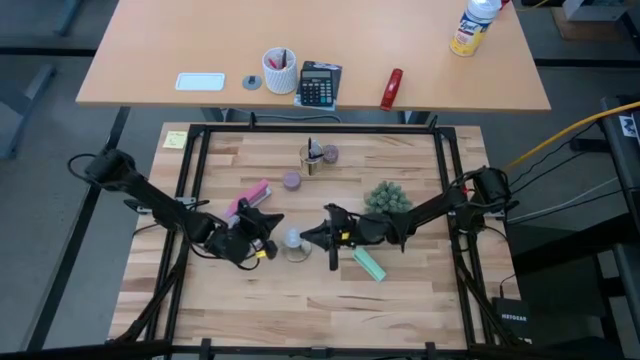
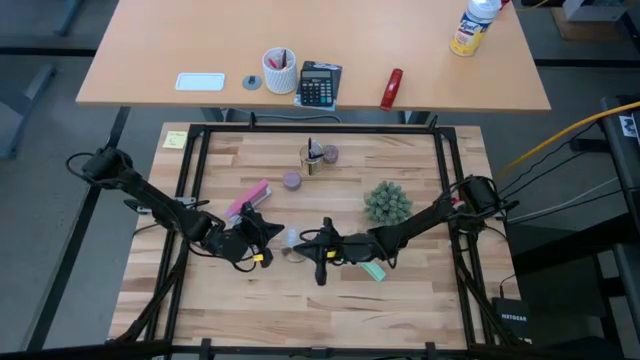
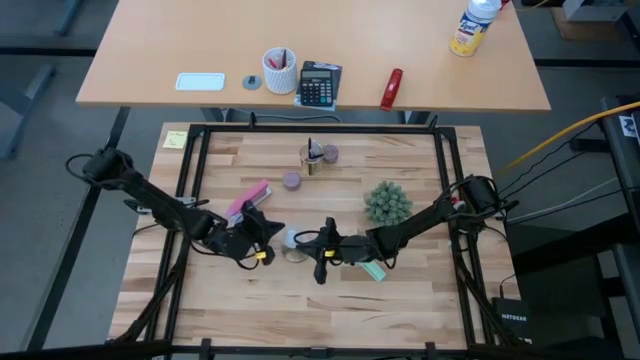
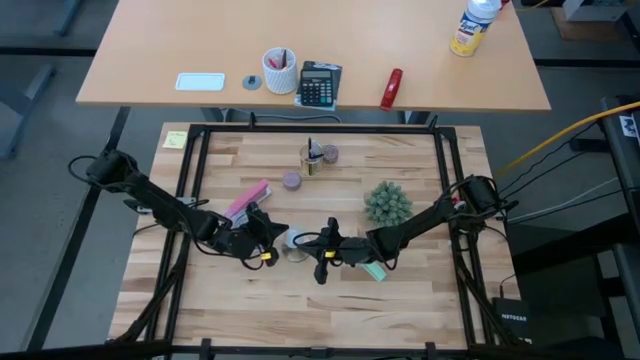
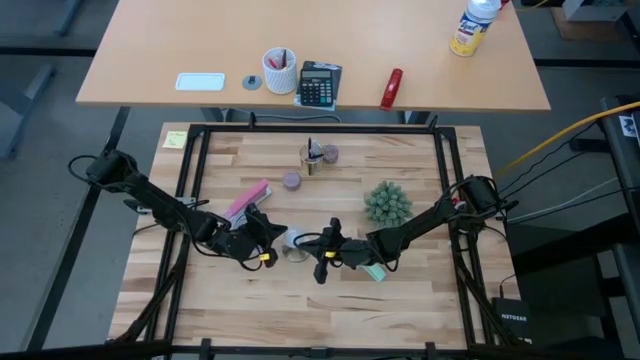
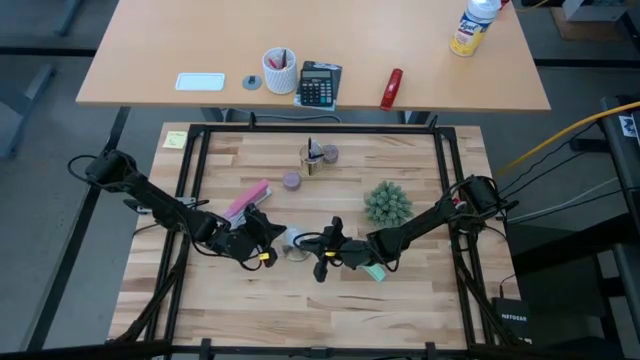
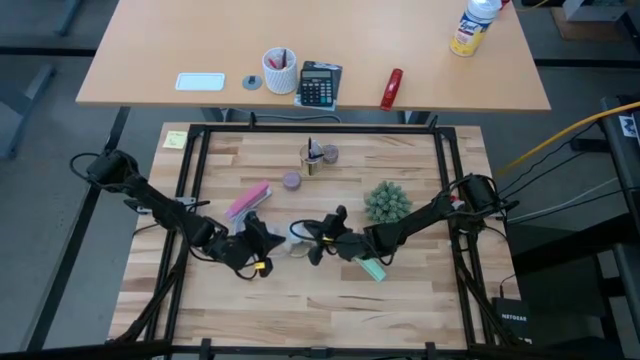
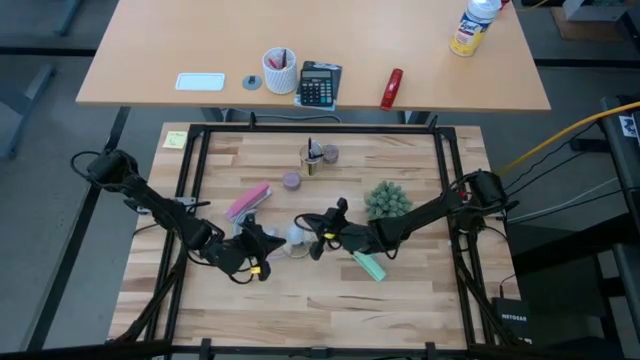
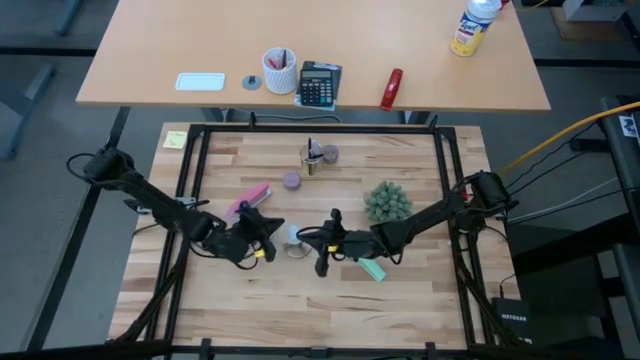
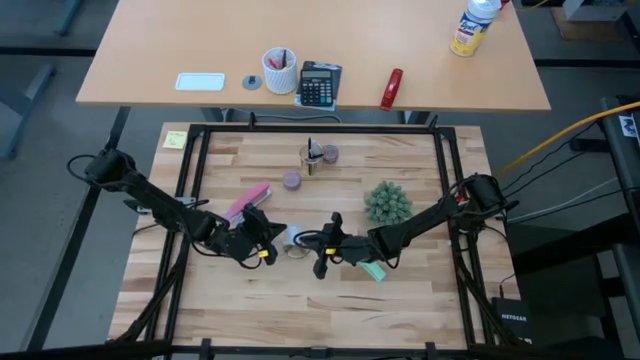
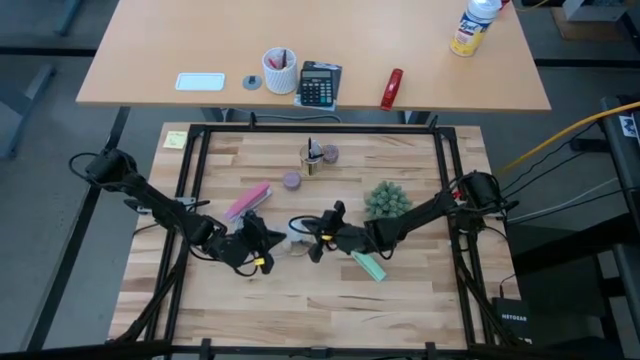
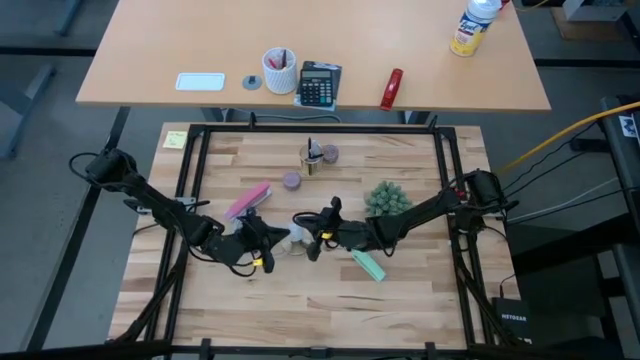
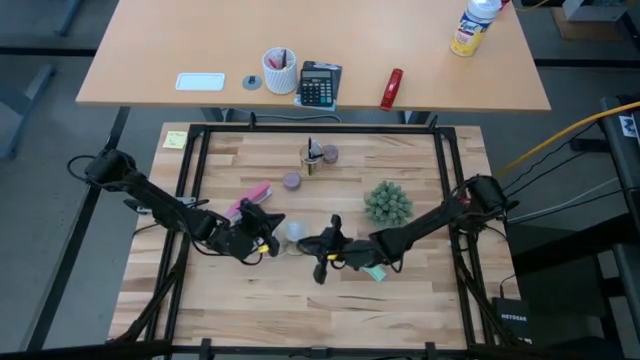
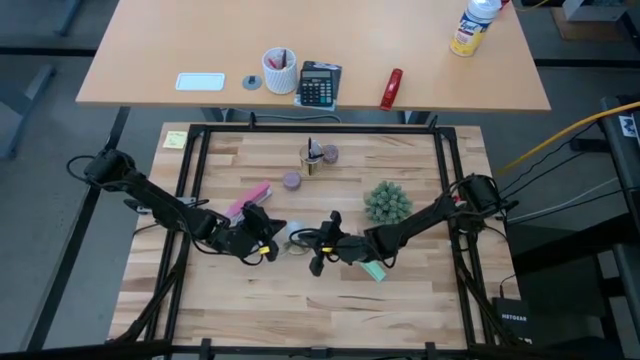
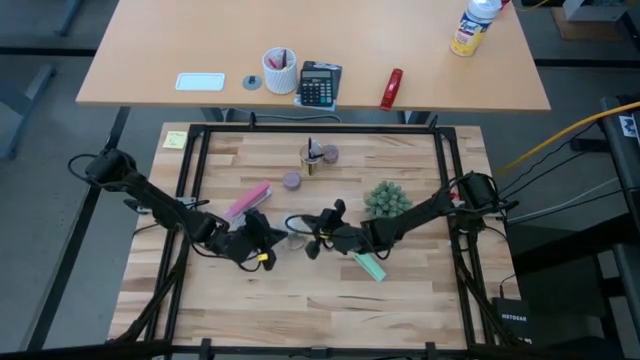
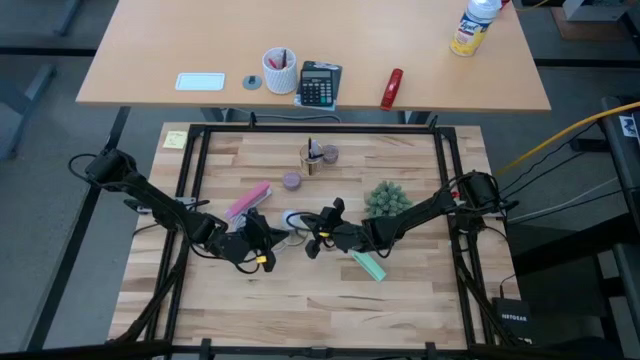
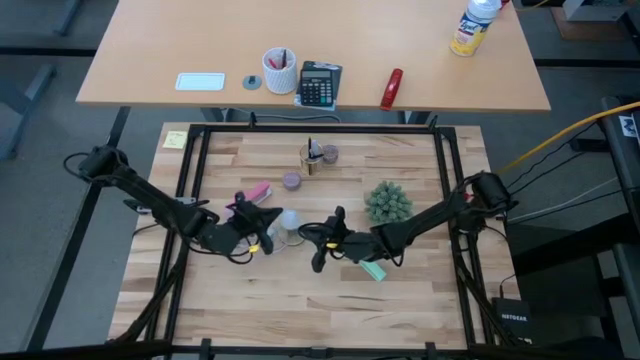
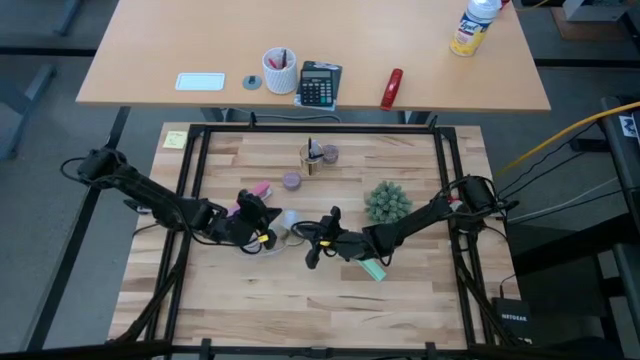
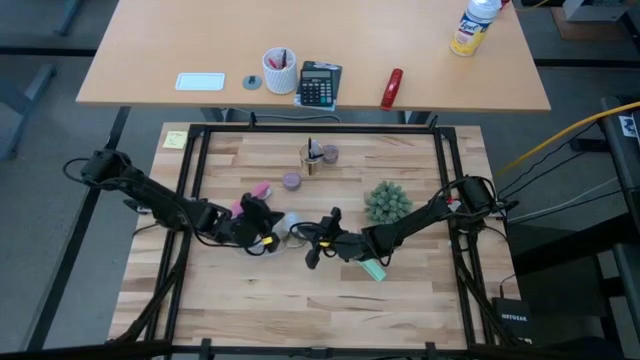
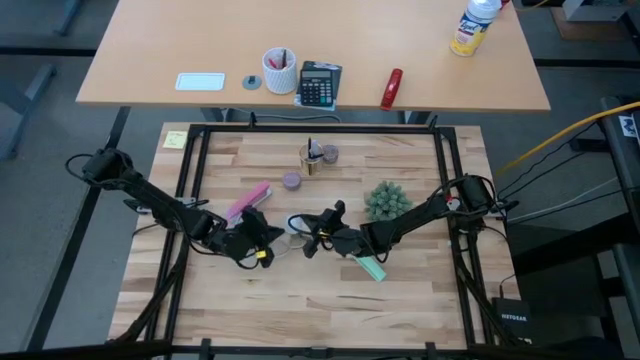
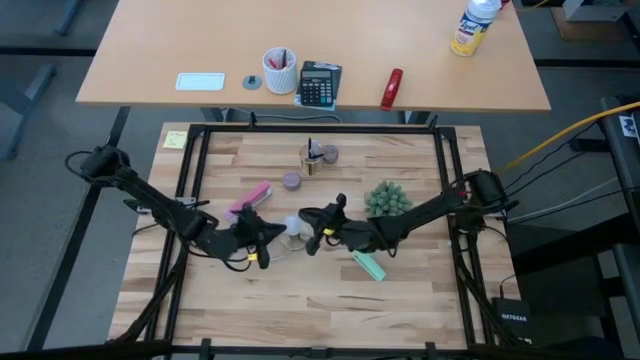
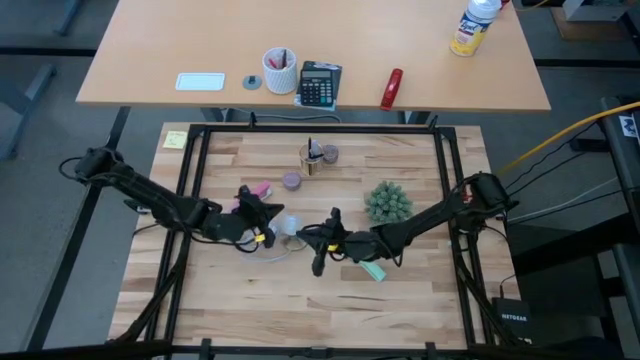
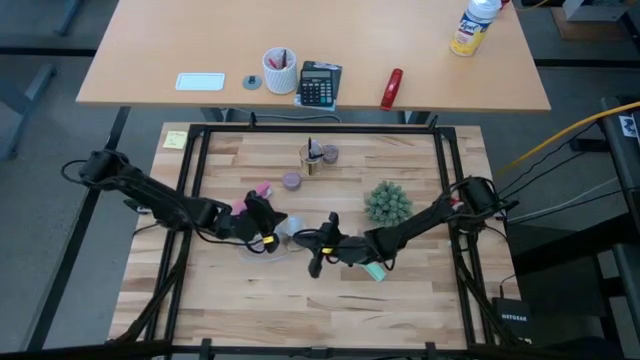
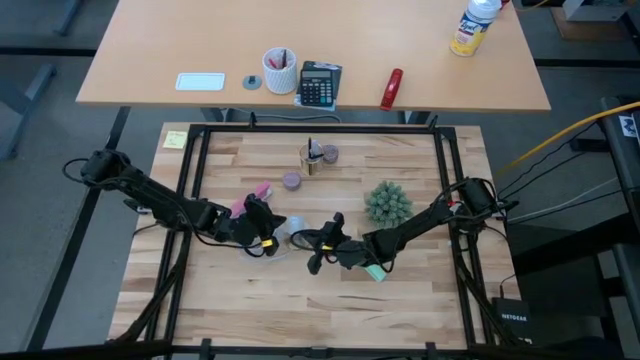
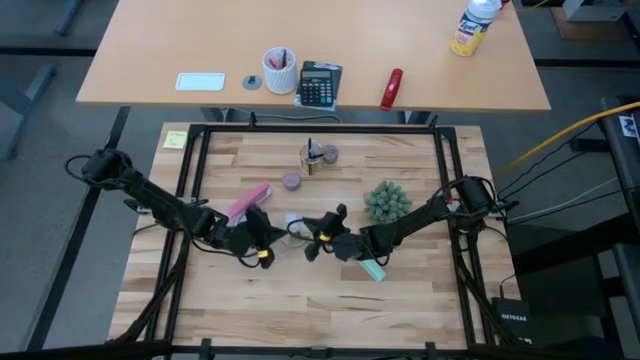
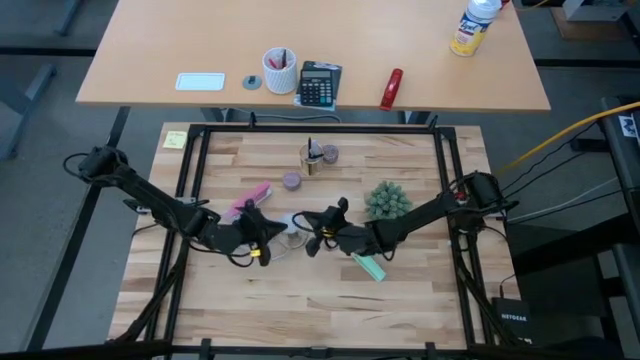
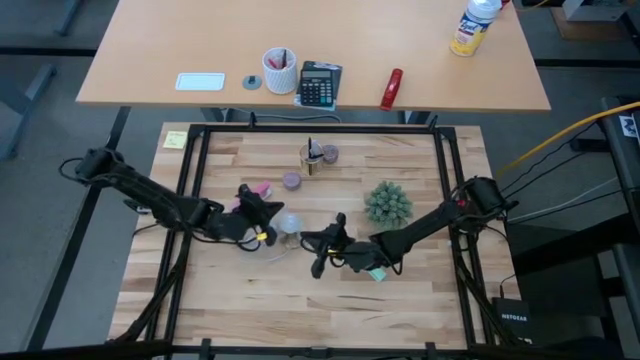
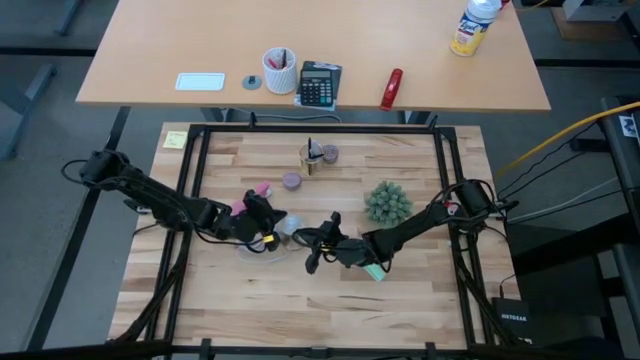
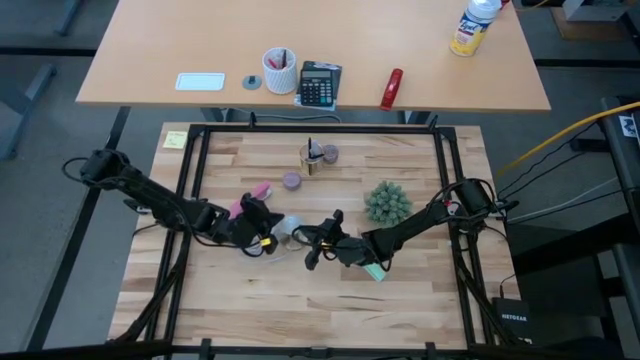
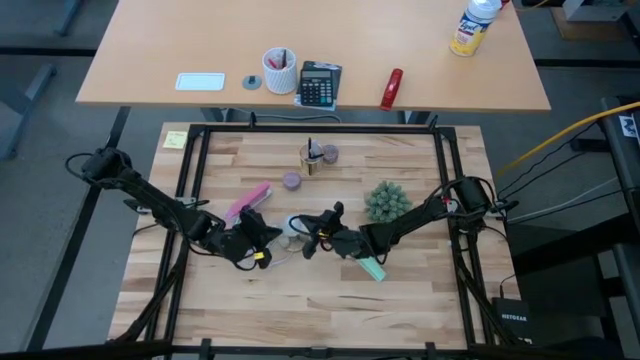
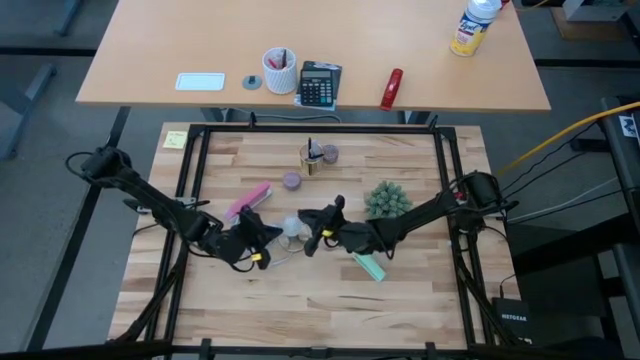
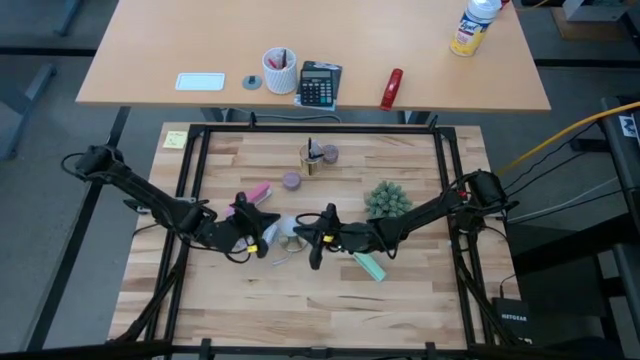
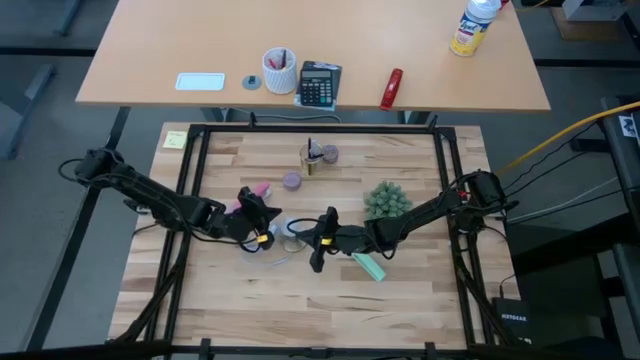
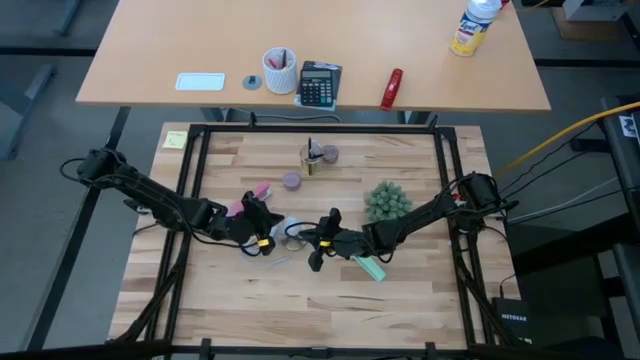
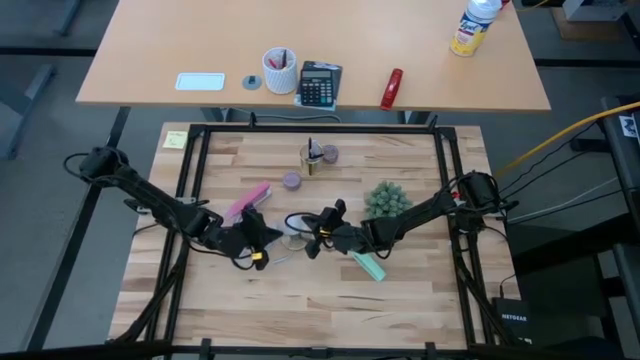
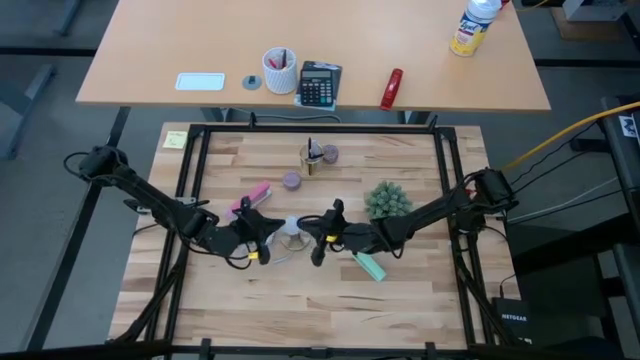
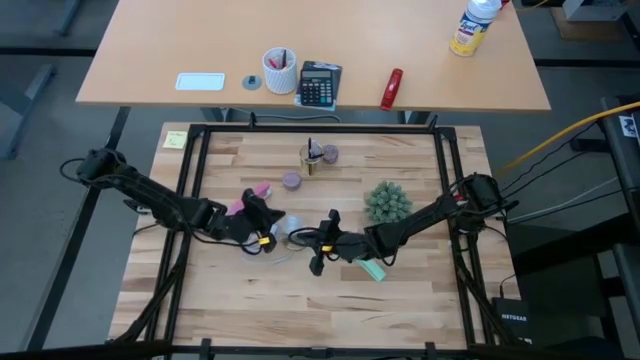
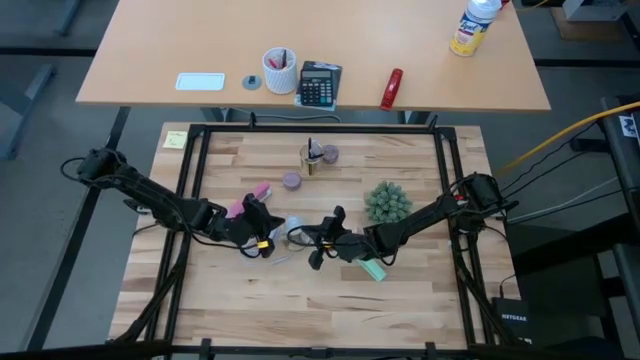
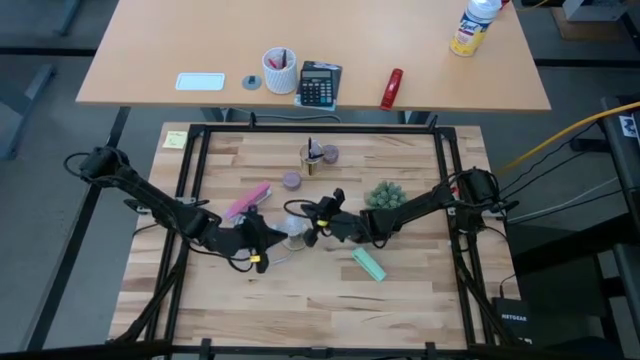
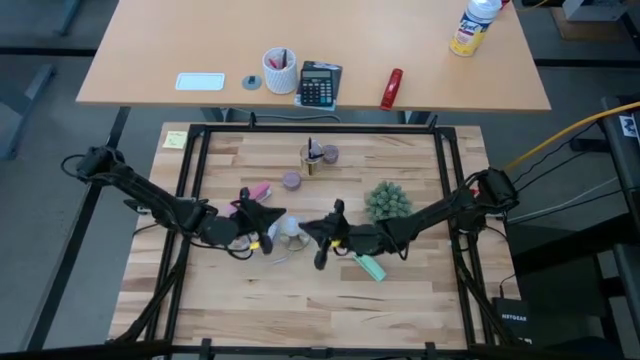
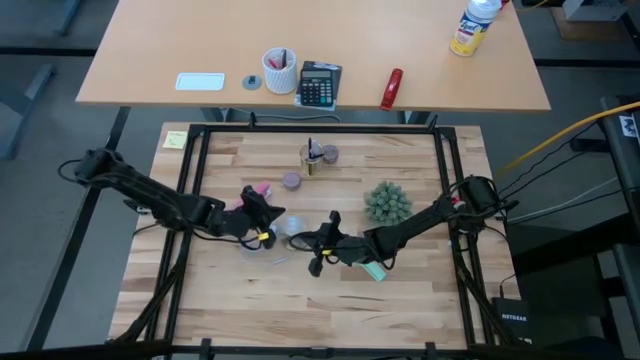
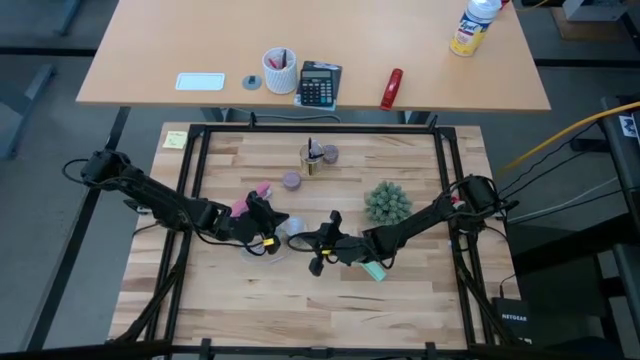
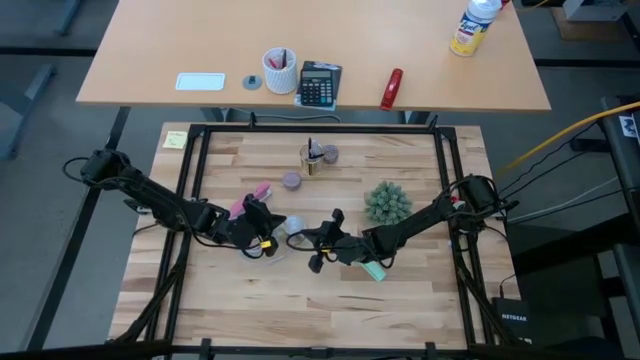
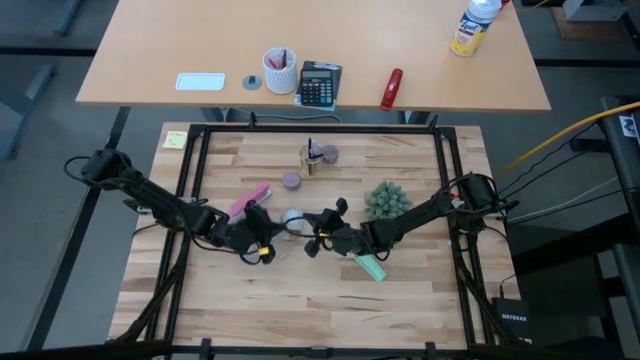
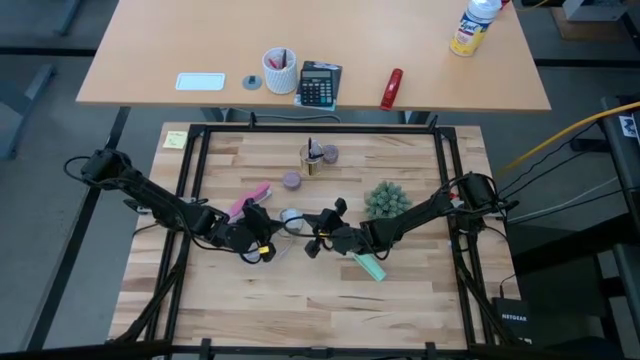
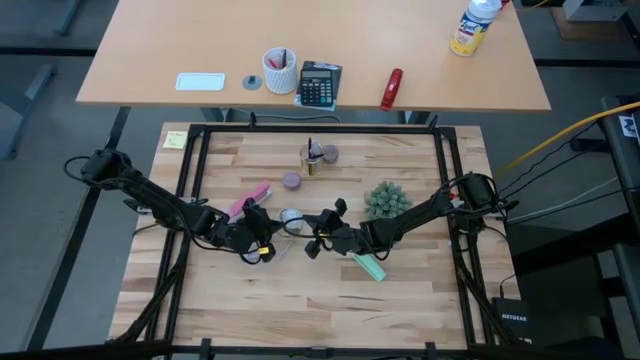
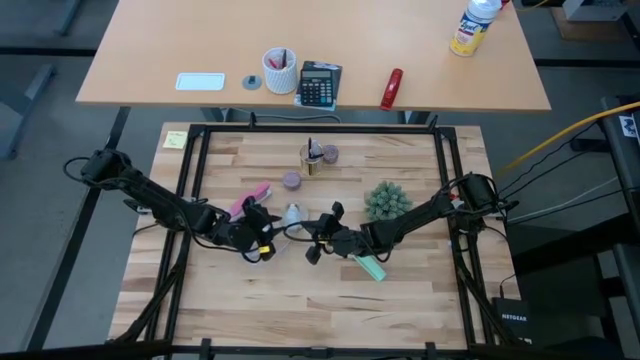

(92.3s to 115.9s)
Task: Screw lightbulb
Remove the lightbulb from the lamp
